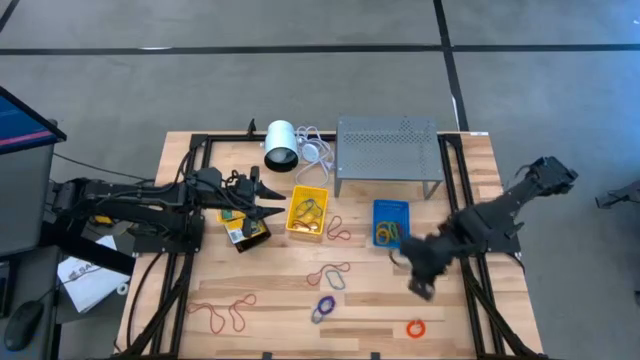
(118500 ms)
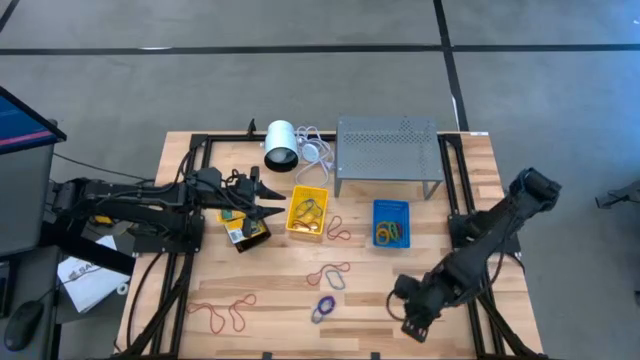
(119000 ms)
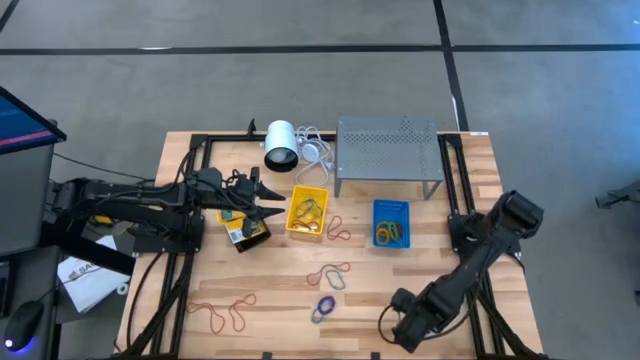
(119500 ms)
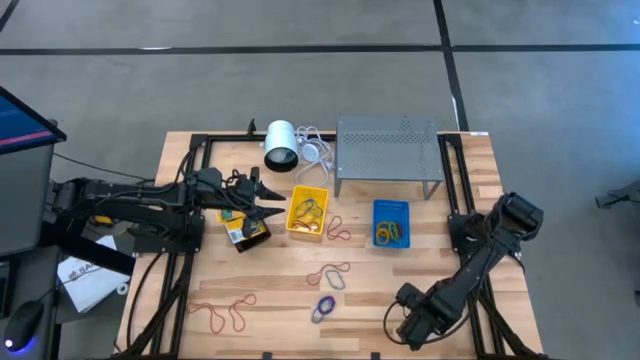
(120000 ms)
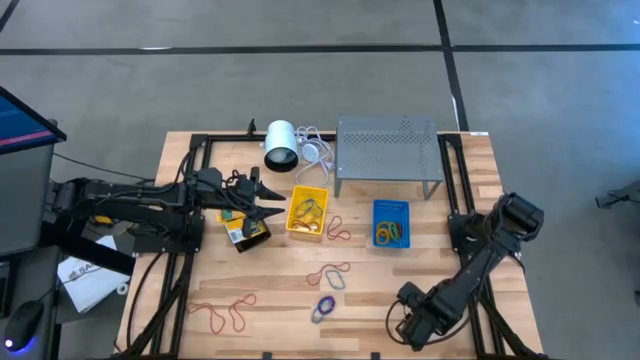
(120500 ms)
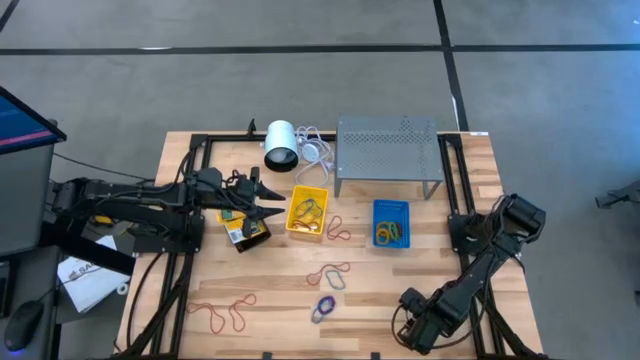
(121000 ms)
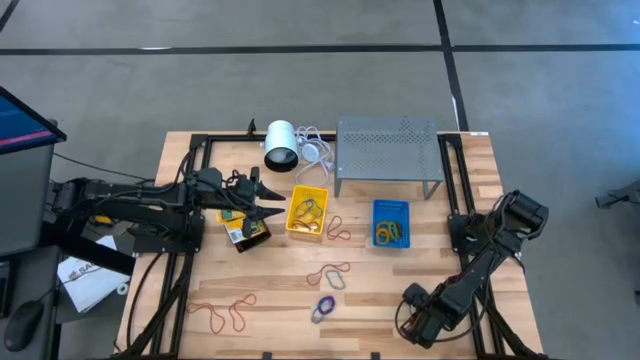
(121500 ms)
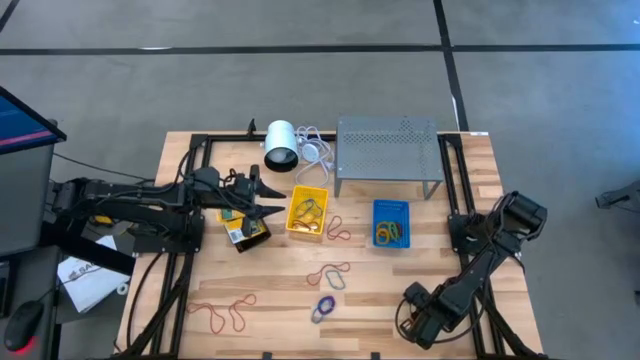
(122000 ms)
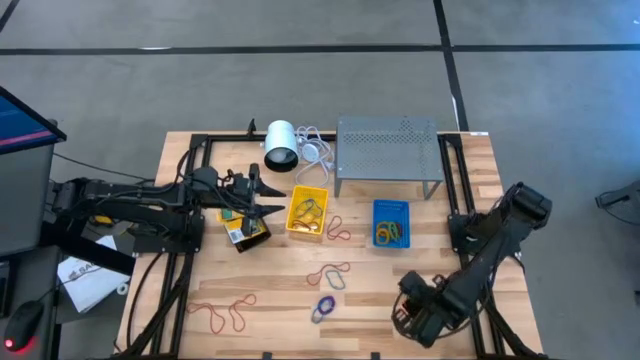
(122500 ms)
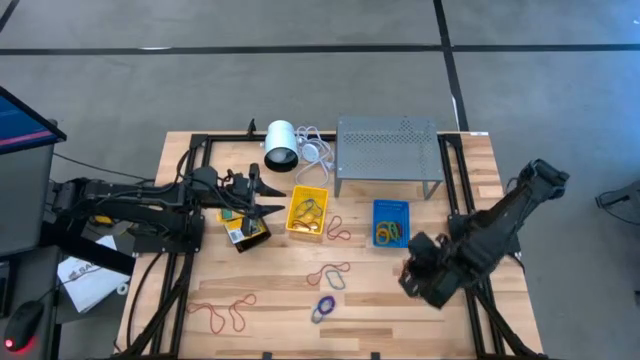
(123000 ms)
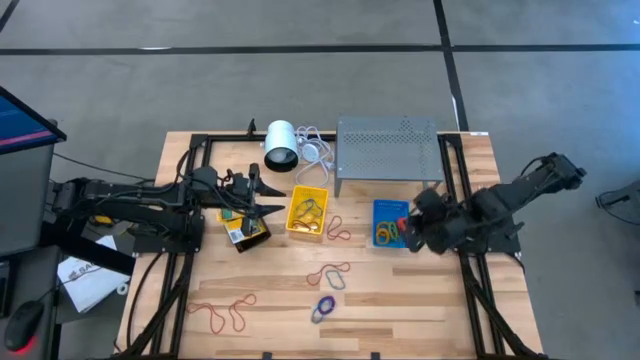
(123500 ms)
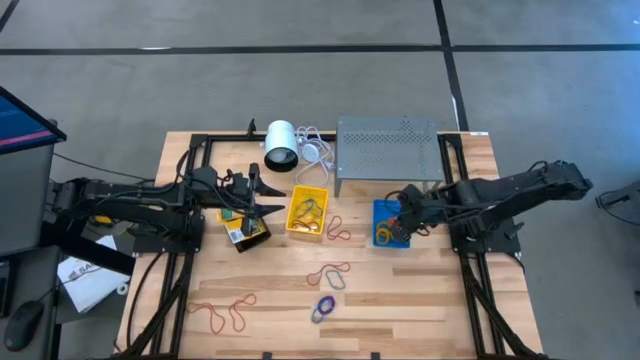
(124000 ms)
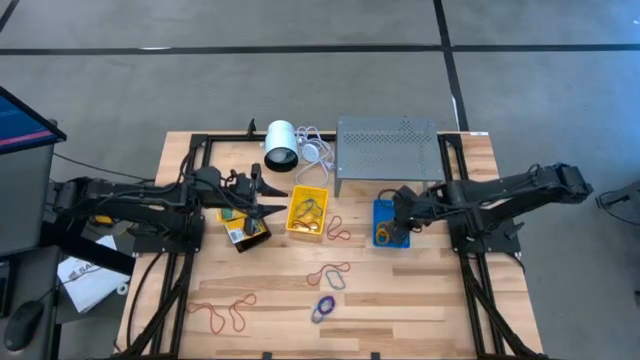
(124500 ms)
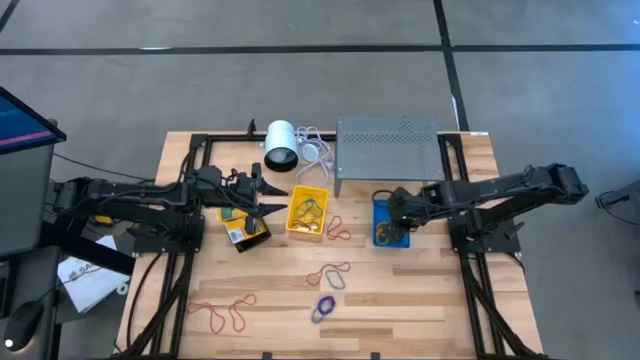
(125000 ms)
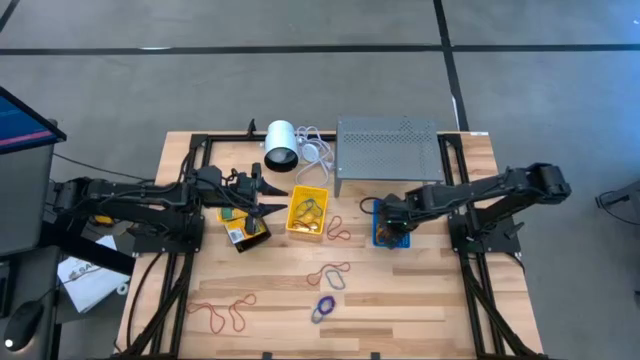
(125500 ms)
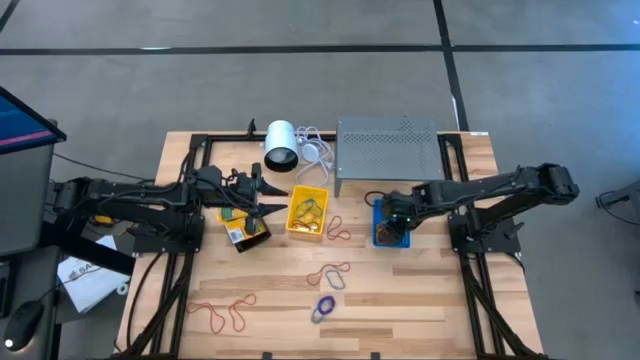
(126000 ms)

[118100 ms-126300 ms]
Task: Pick & Place Office Desk Supplies
Put the orange elastic key ring into the blue basket

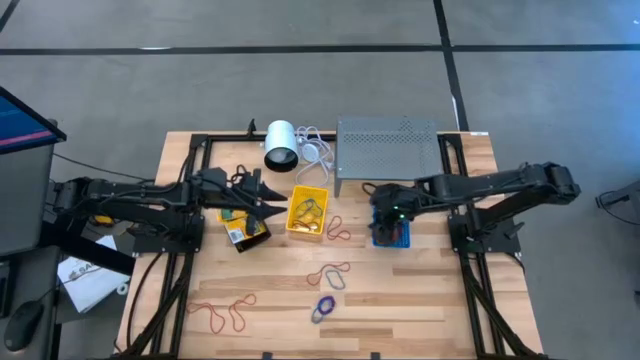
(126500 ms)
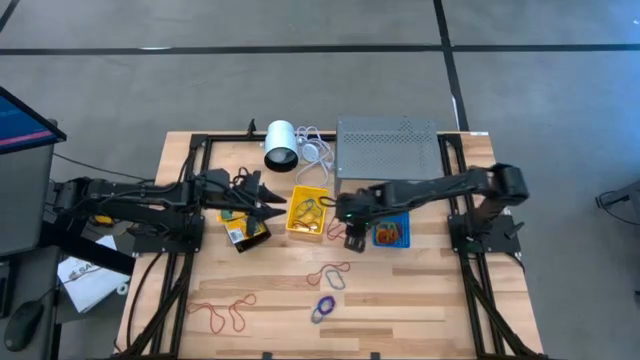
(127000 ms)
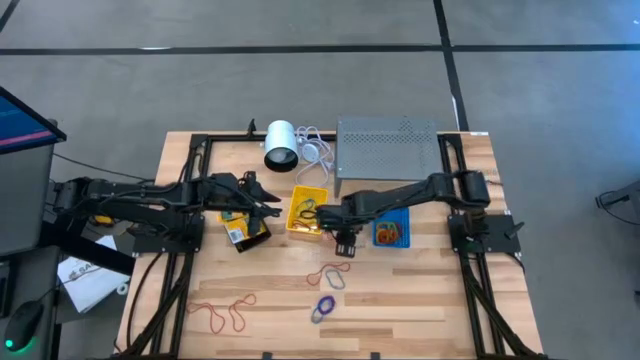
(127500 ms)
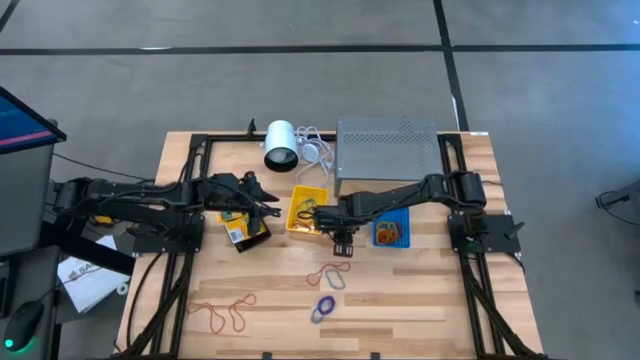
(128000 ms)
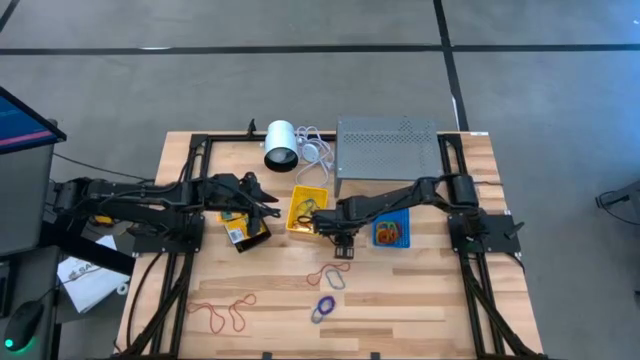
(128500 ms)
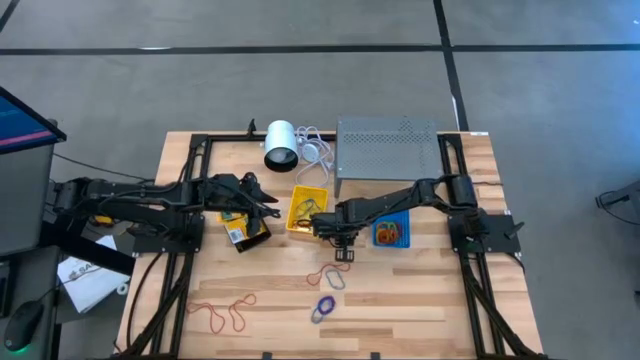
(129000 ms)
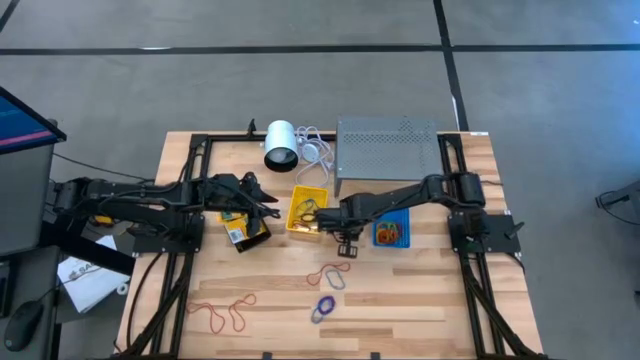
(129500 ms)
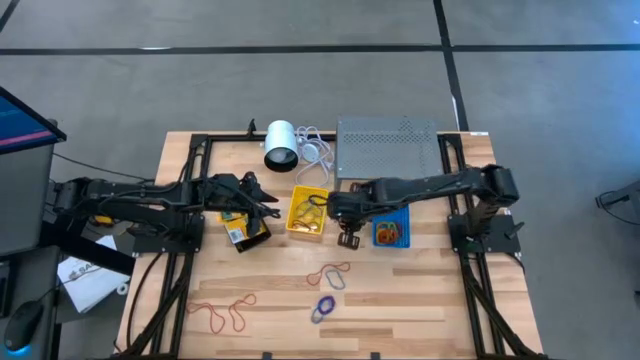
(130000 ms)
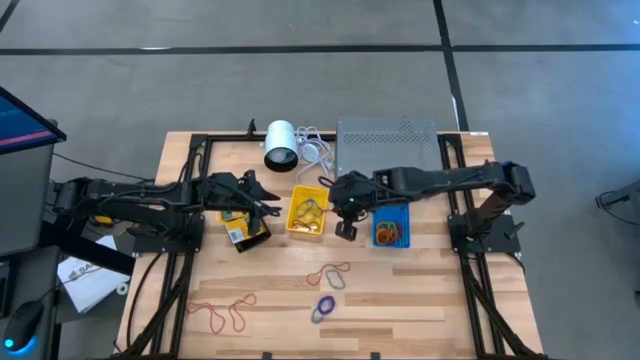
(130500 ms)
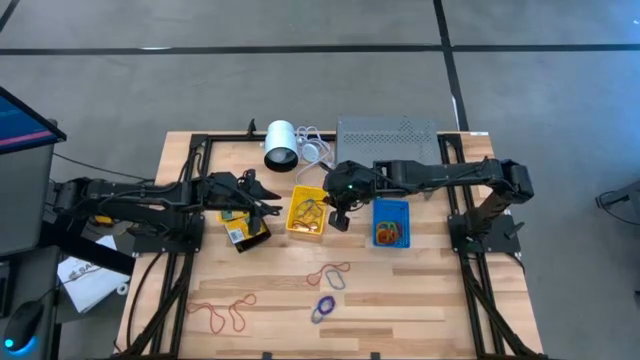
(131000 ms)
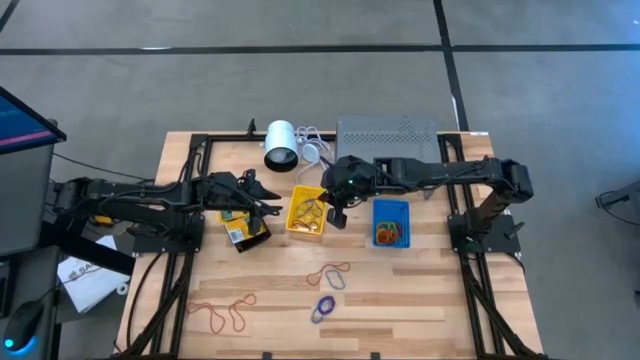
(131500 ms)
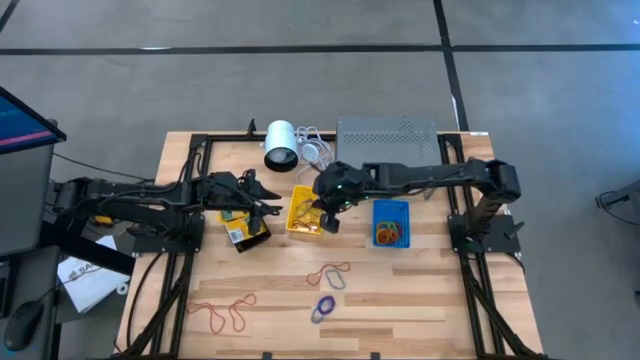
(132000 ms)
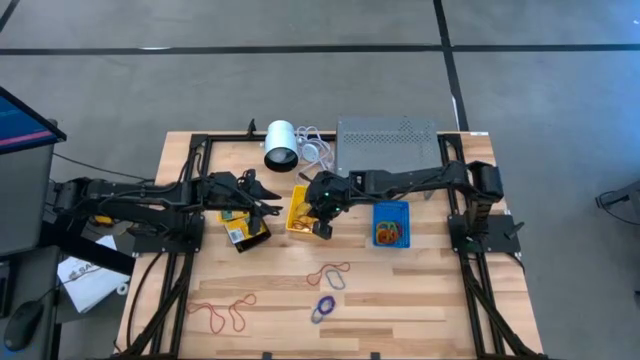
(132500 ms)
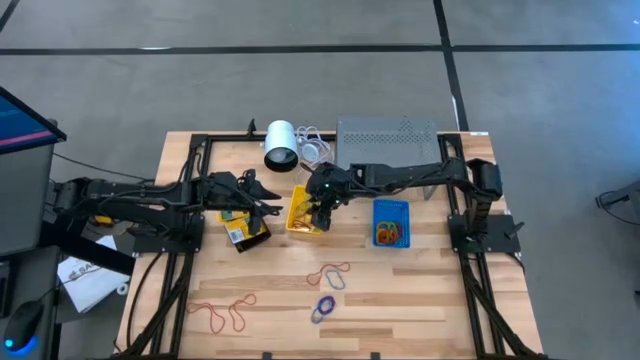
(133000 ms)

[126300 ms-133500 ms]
Put the top red rubber band into the yellow basket

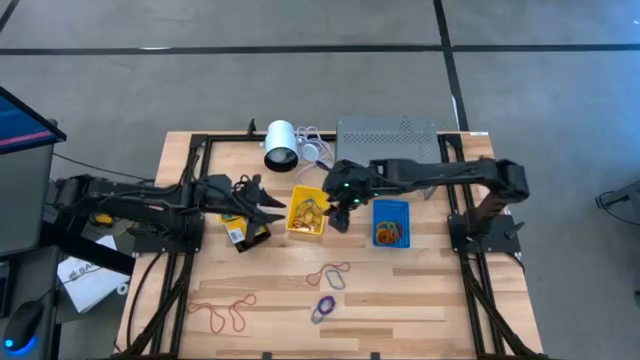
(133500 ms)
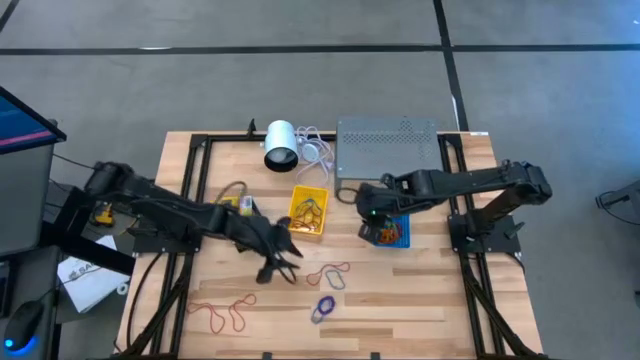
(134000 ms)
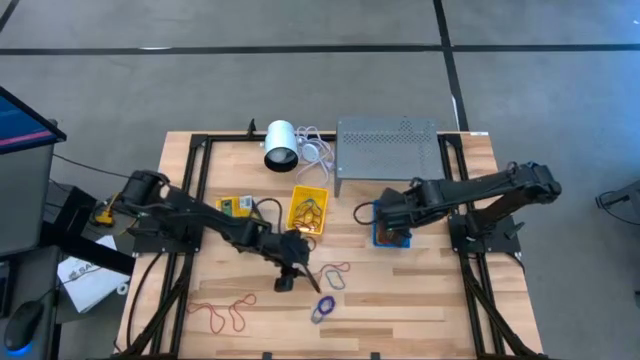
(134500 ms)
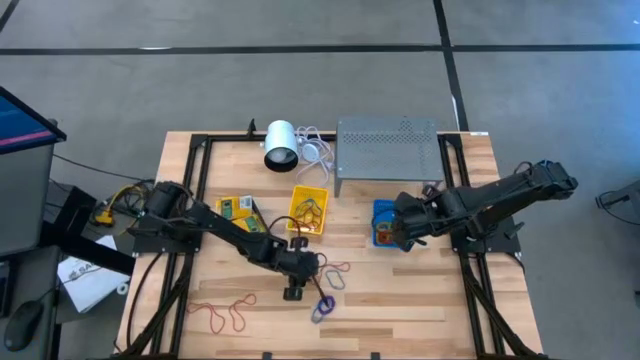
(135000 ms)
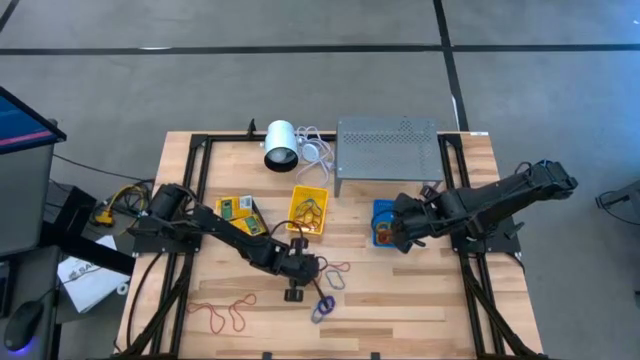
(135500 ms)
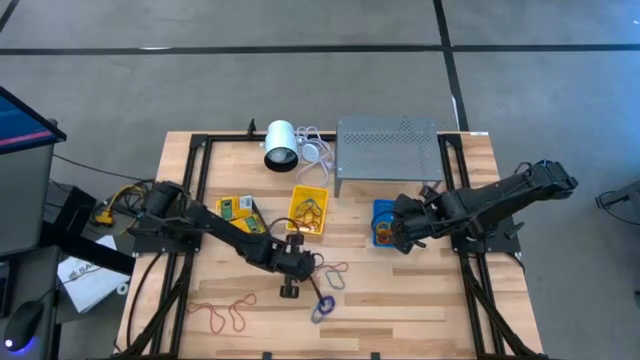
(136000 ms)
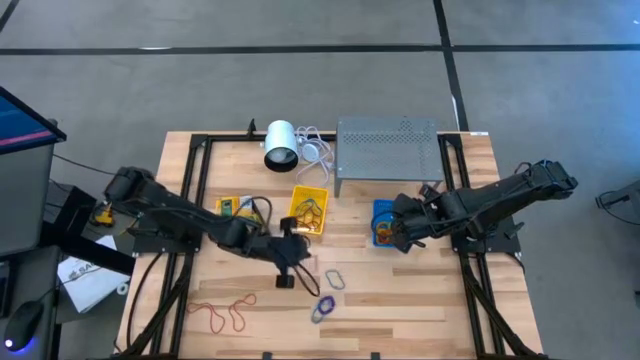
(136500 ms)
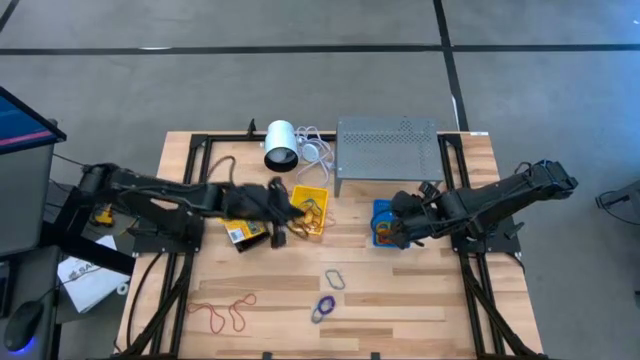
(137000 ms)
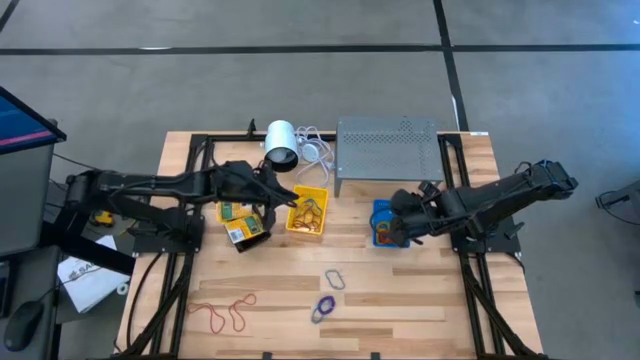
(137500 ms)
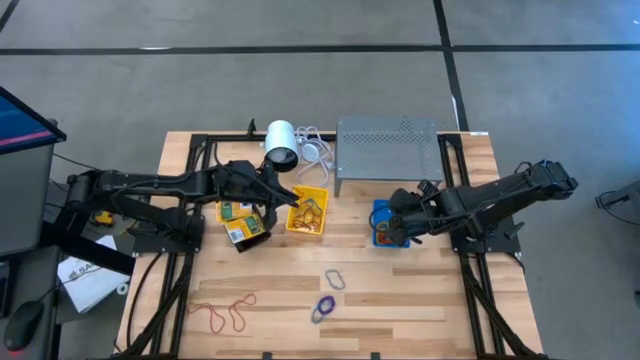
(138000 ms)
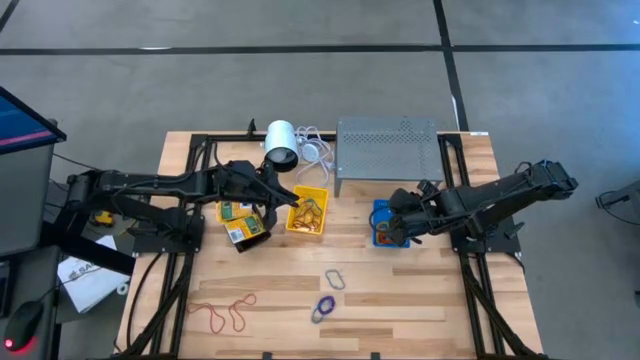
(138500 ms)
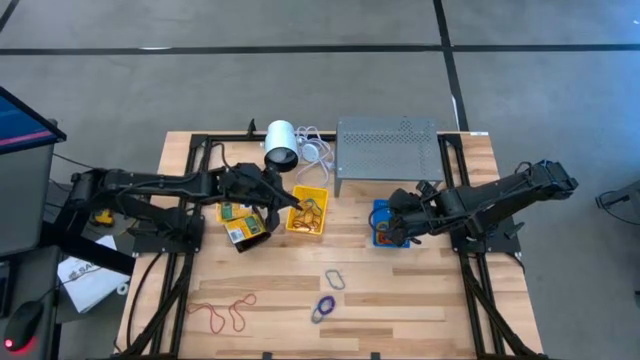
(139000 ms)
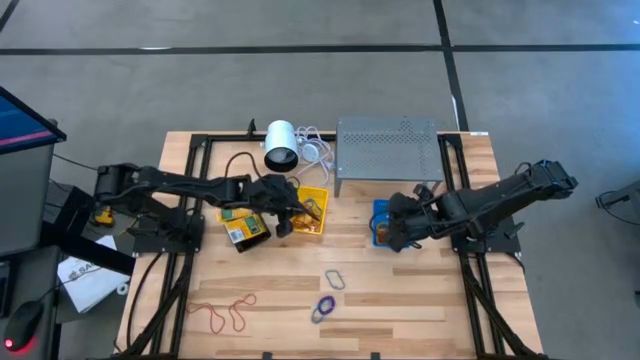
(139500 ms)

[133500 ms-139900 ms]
Put the top red rubber band into the yellow basket

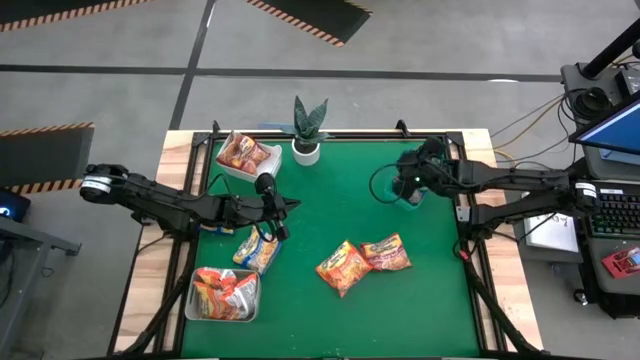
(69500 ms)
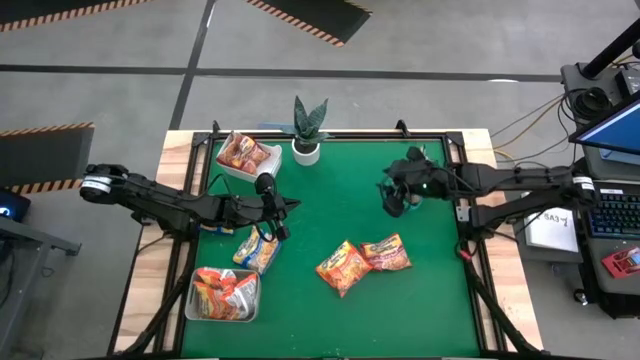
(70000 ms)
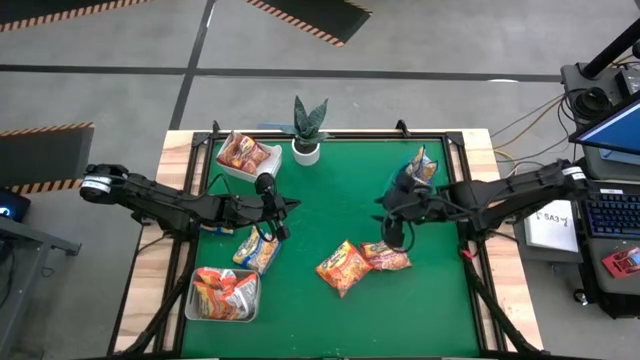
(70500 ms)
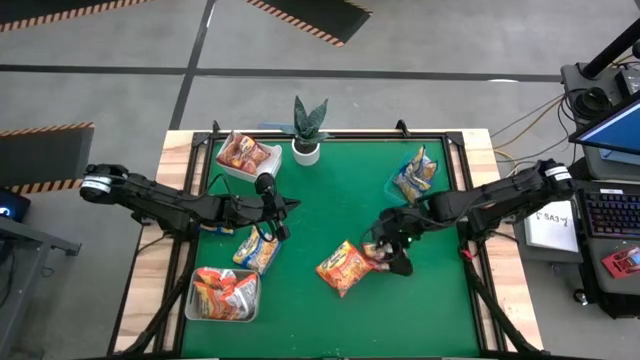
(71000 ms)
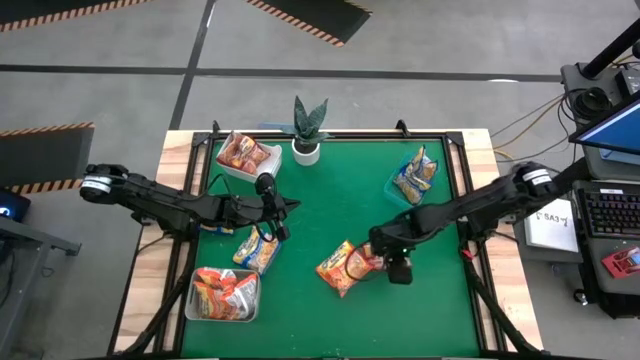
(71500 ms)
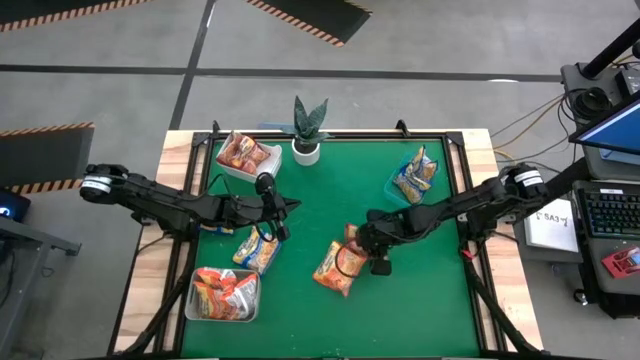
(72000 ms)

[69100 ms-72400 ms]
Task: Sort Maruchan noodles
Put the red noodle pack into the white bin
